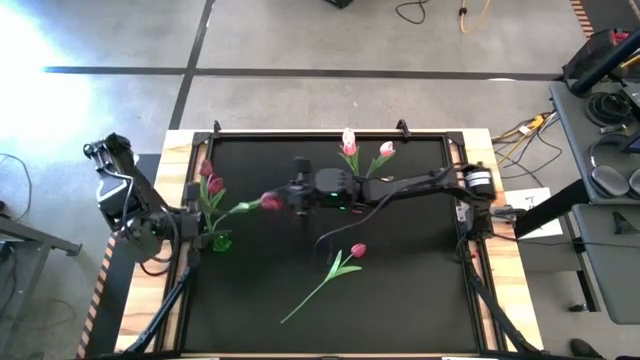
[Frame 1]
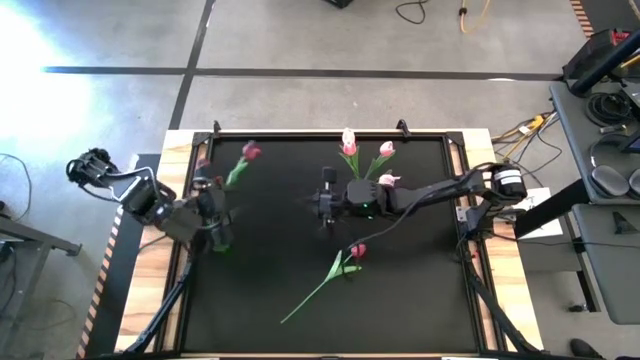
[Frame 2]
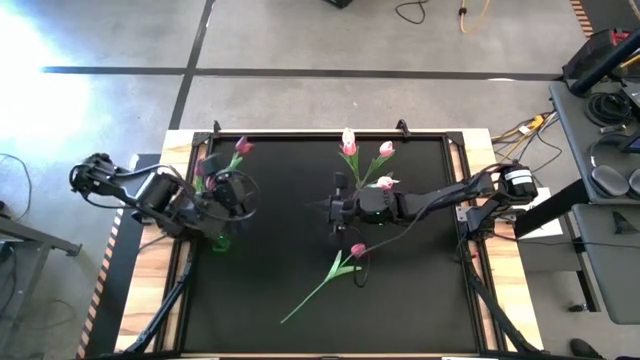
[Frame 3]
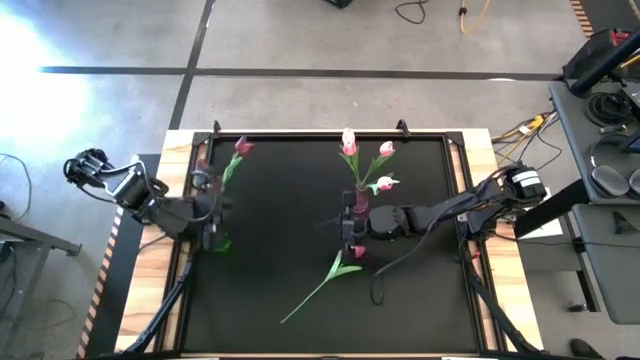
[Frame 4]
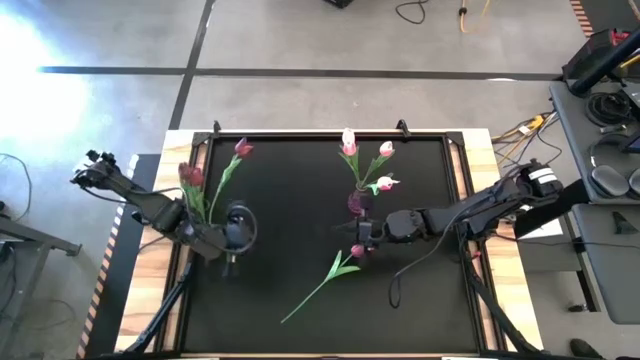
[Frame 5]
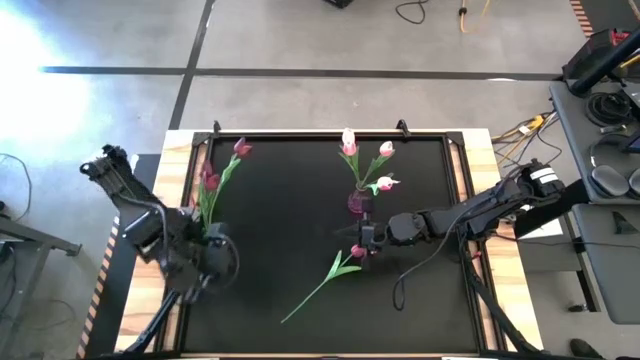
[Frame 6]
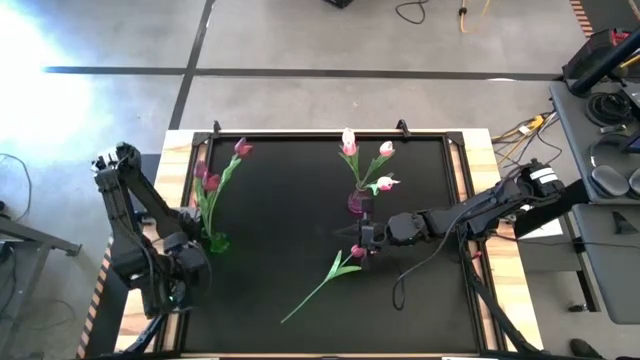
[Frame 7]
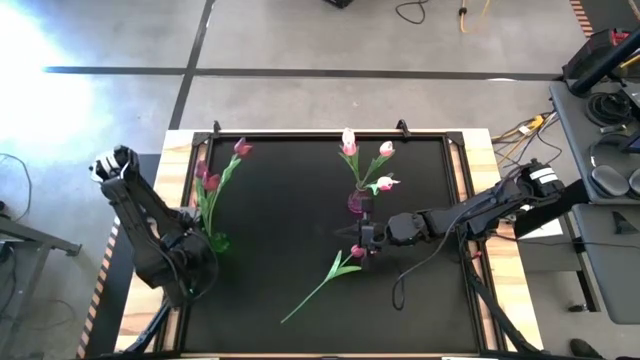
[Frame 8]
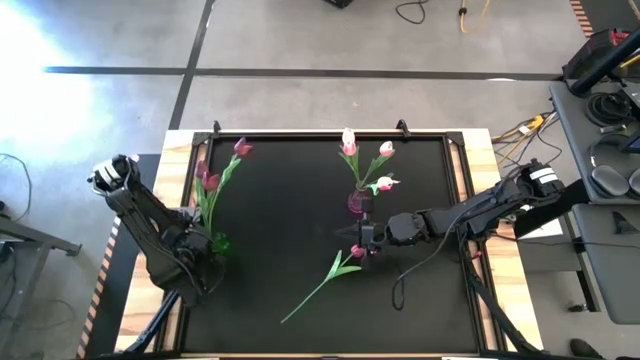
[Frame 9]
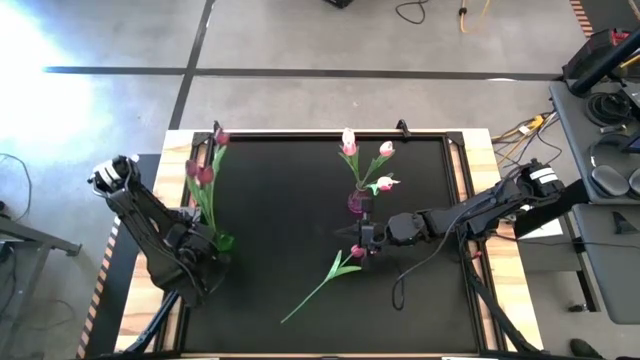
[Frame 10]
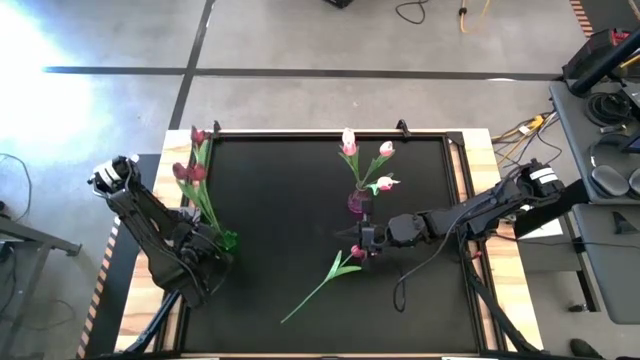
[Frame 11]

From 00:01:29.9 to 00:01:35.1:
Task: Sort flowers into vase by color
Adjust the green vase on the shelf

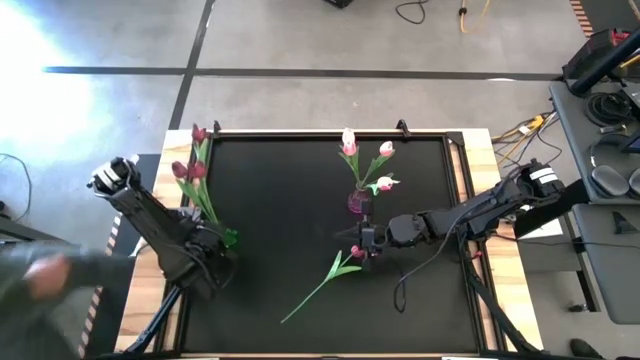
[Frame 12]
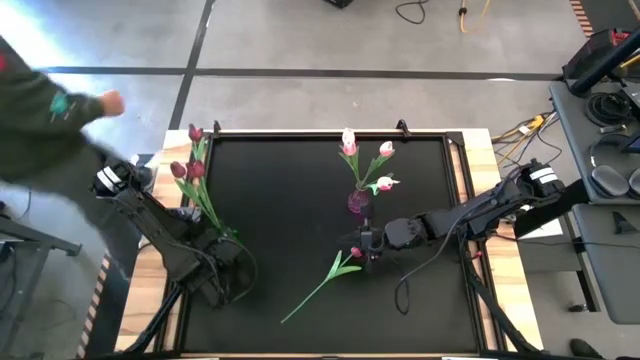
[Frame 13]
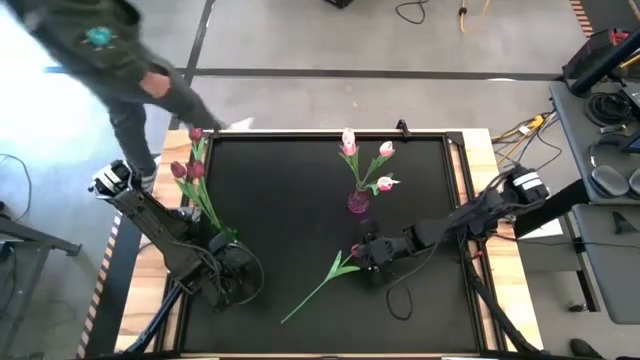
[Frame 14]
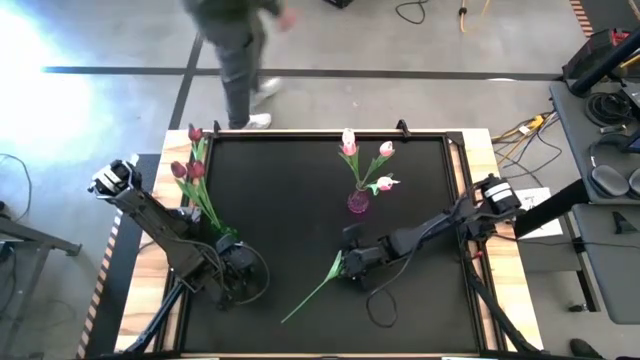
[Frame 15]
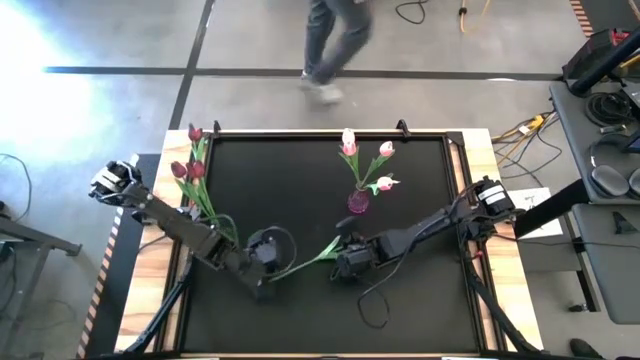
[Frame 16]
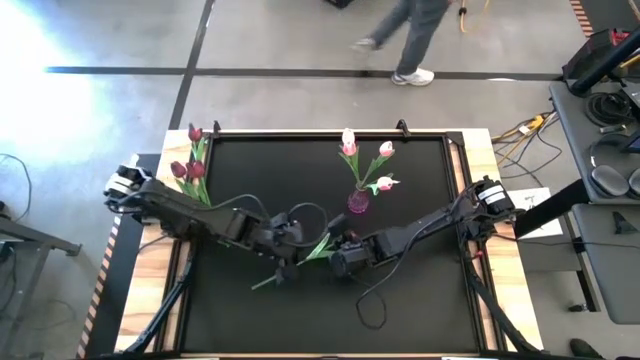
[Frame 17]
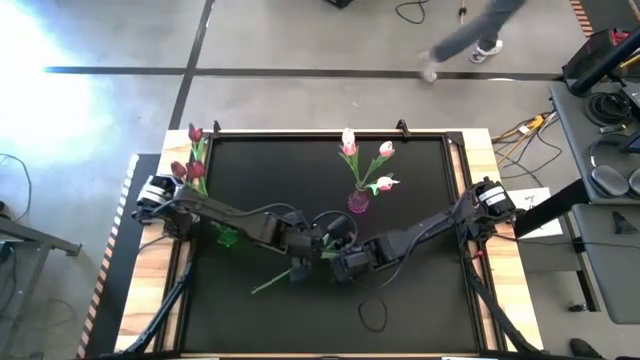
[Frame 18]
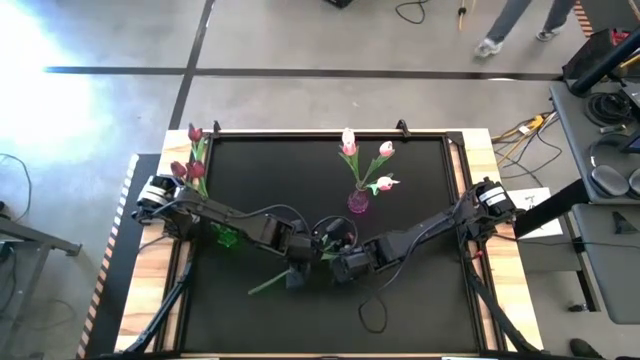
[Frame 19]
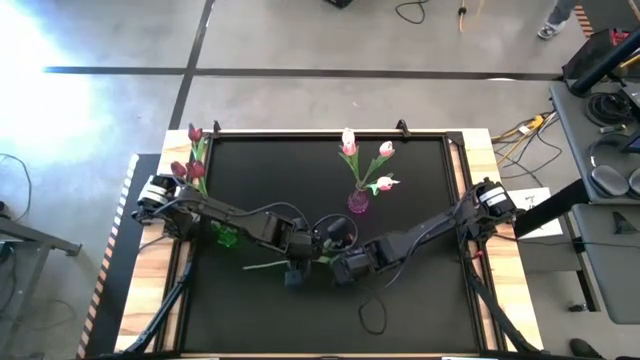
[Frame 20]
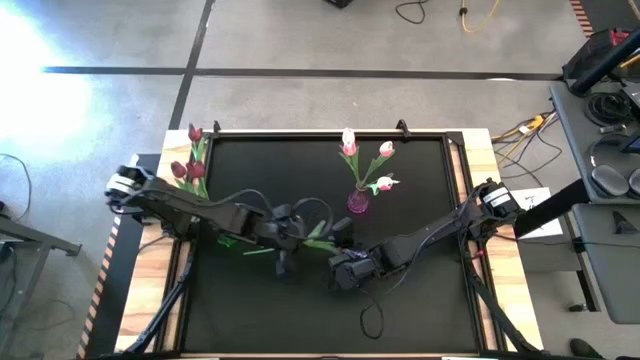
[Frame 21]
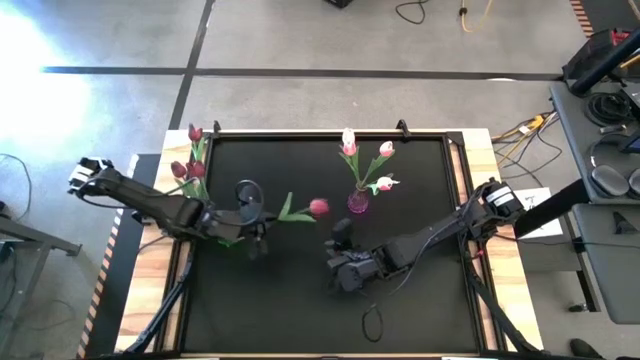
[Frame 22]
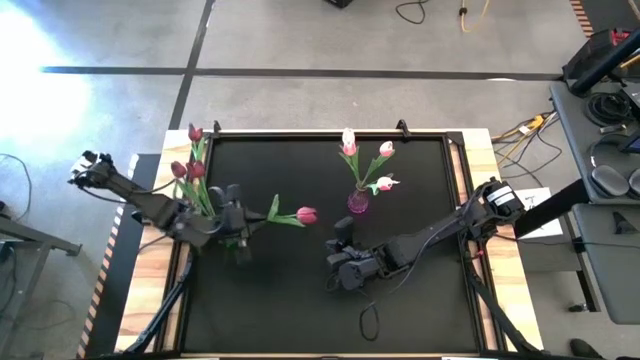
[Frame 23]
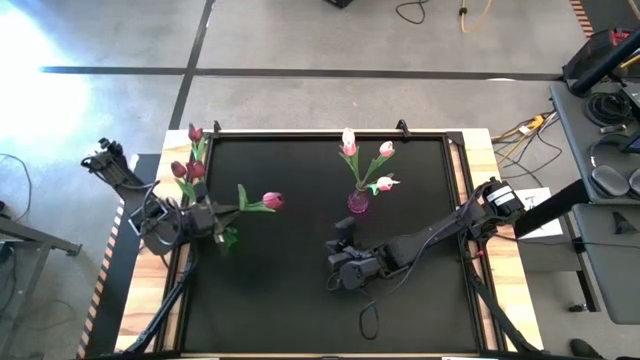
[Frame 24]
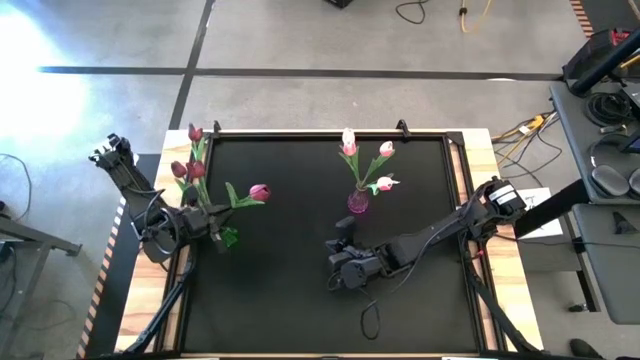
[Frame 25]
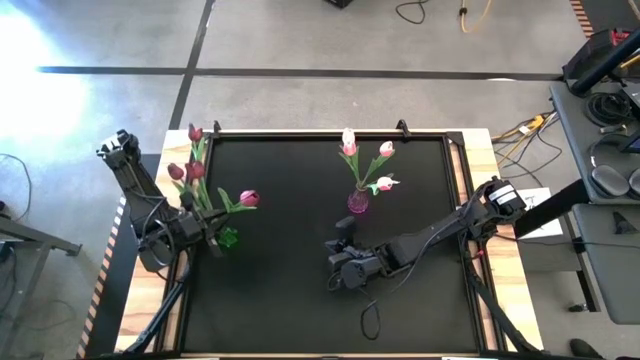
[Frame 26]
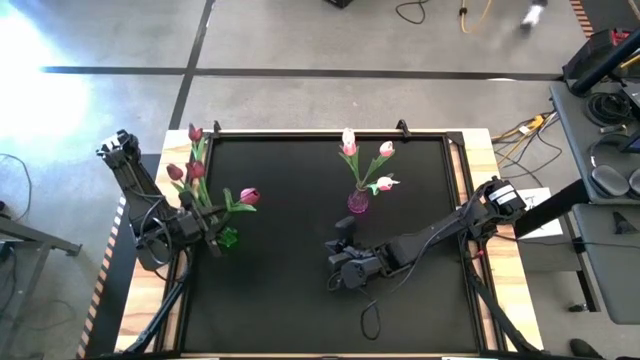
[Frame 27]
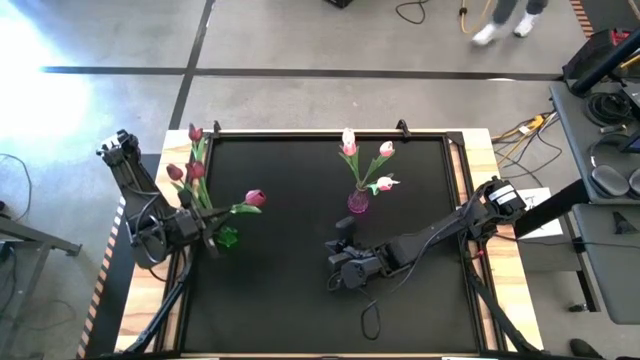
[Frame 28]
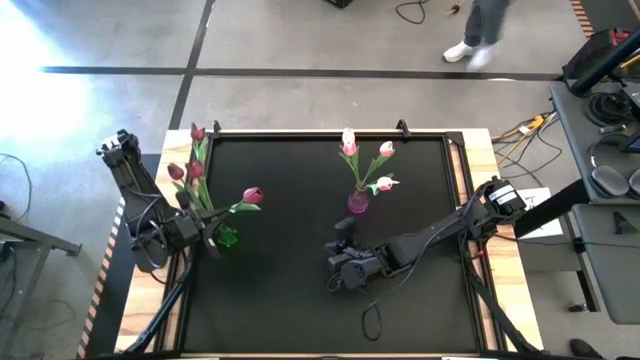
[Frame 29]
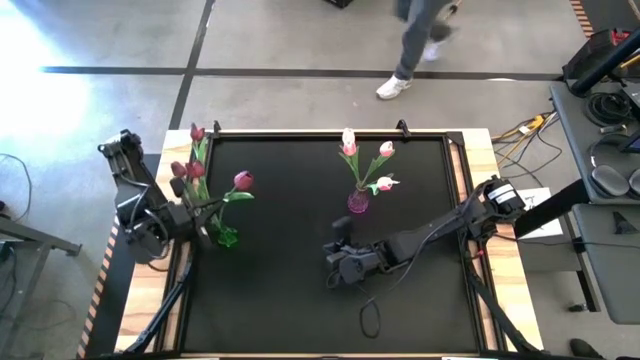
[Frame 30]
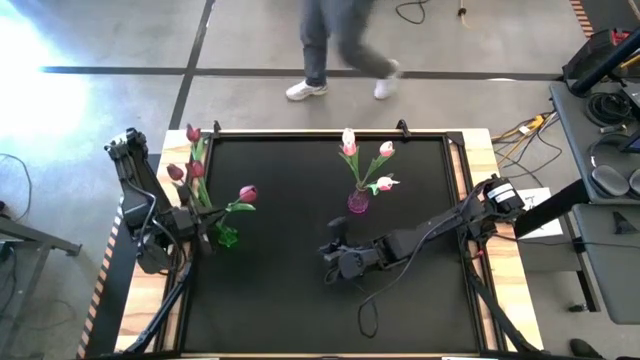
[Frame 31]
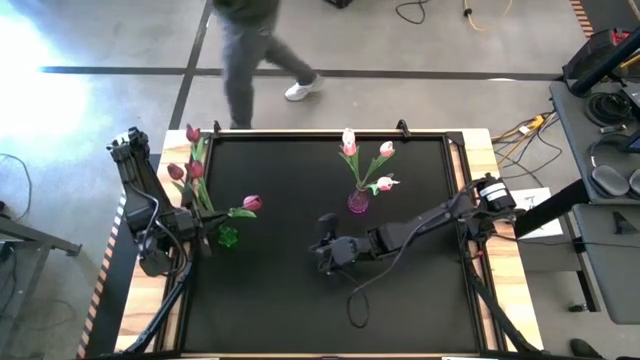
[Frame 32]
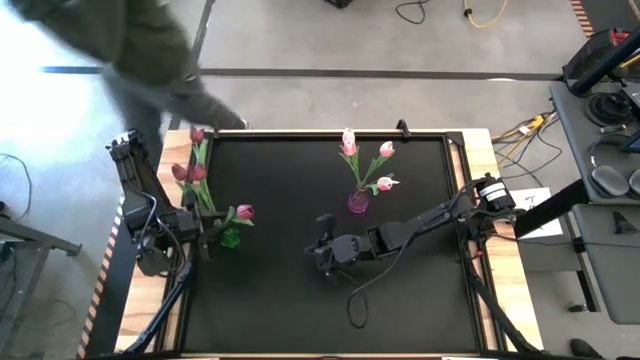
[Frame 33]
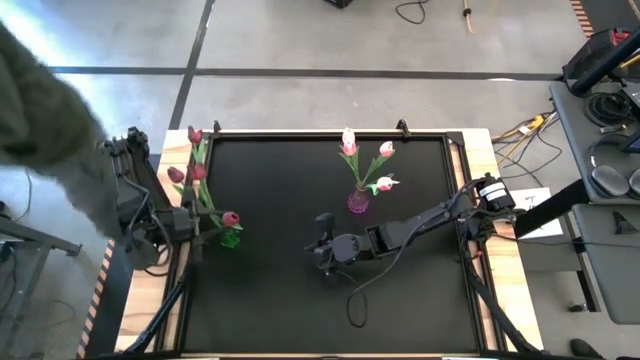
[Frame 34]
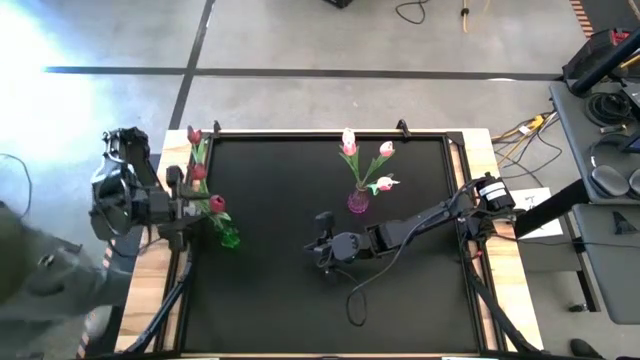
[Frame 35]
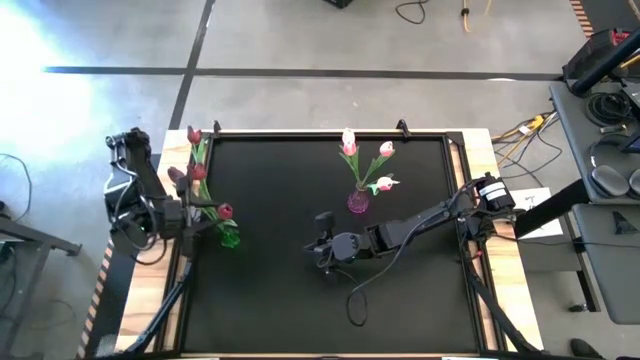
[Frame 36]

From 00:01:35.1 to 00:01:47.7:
Put the red tulip into the green vase

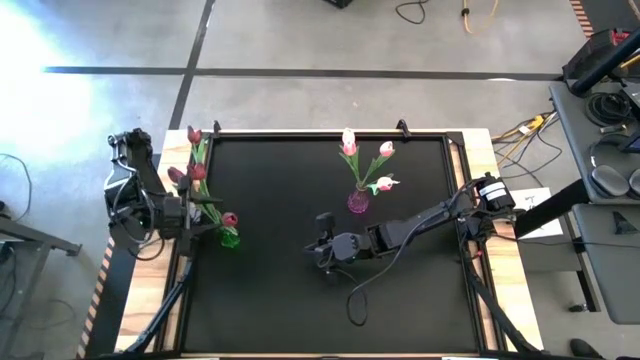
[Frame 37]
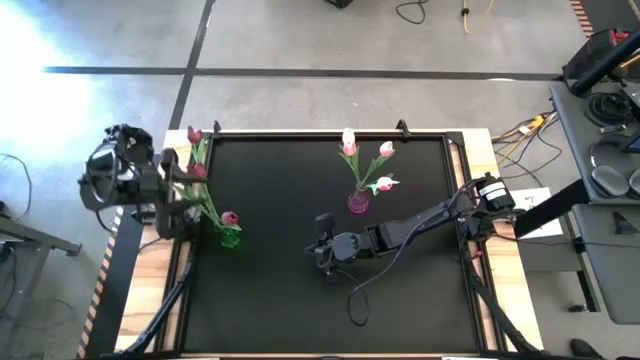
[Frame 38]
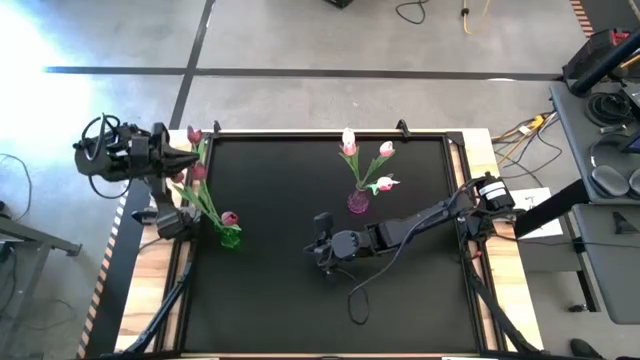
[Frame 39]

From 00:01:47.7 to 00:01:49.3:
Put the red tulip into the green vase
